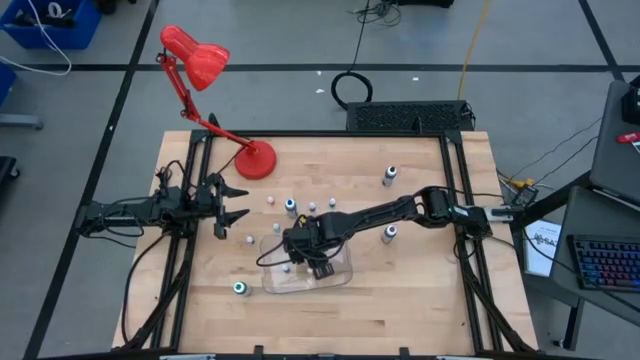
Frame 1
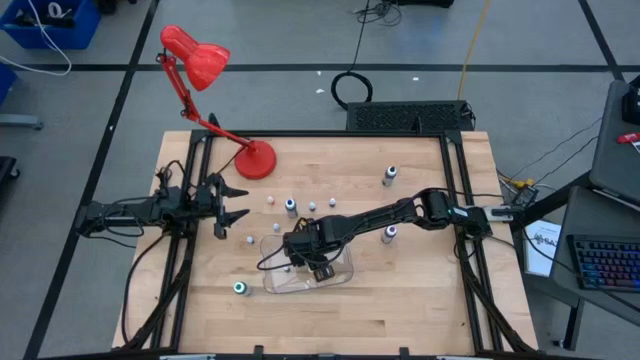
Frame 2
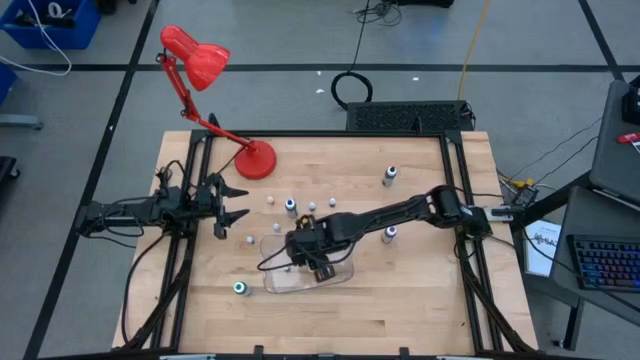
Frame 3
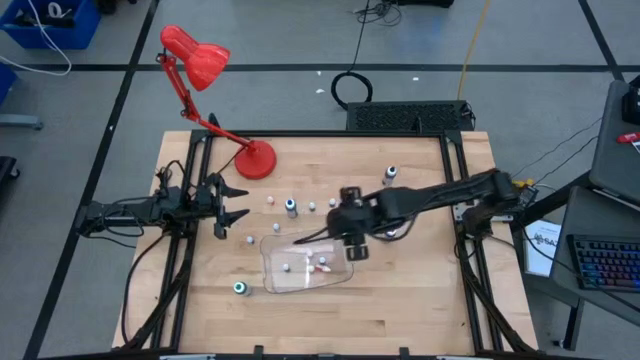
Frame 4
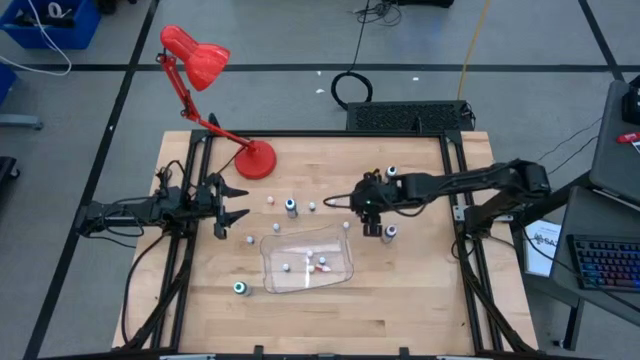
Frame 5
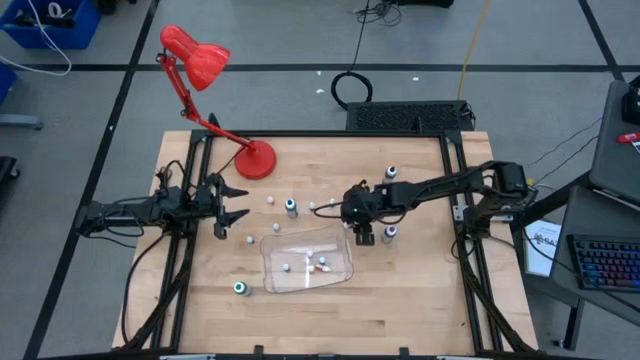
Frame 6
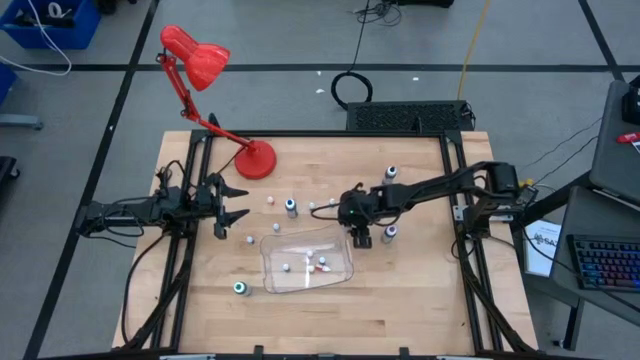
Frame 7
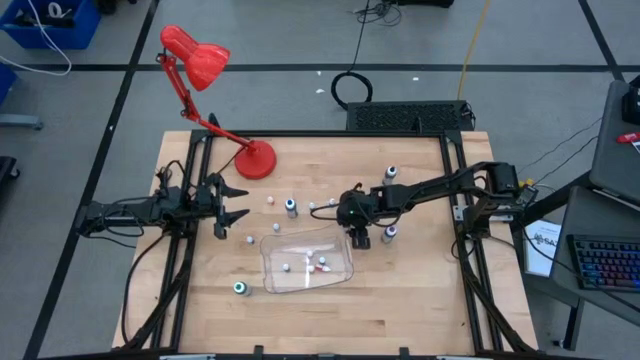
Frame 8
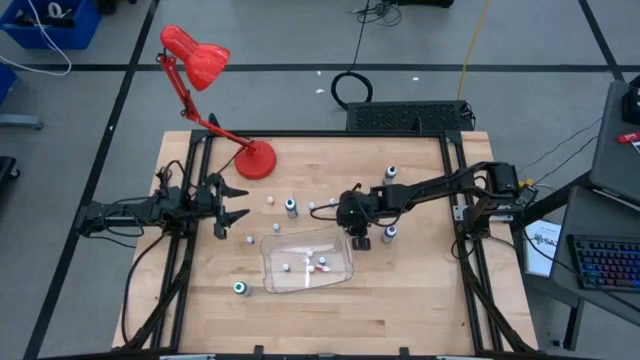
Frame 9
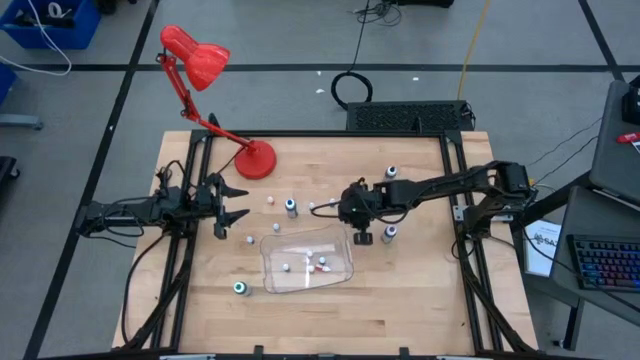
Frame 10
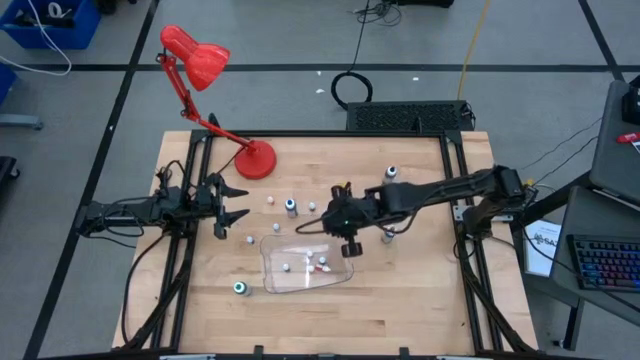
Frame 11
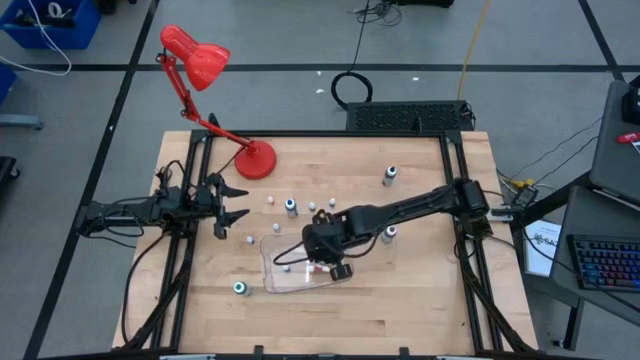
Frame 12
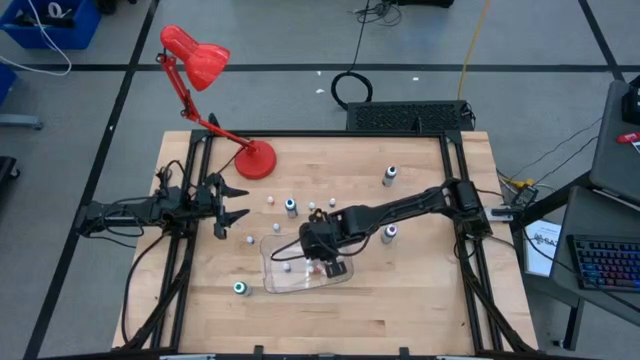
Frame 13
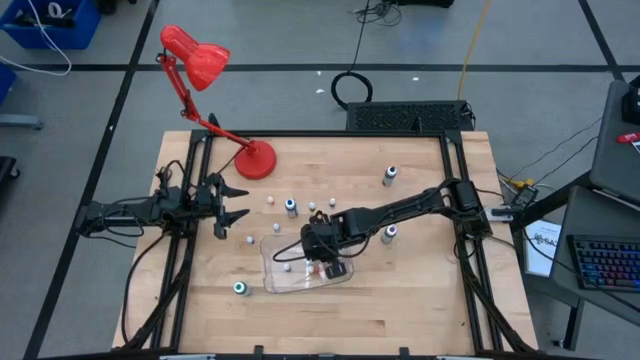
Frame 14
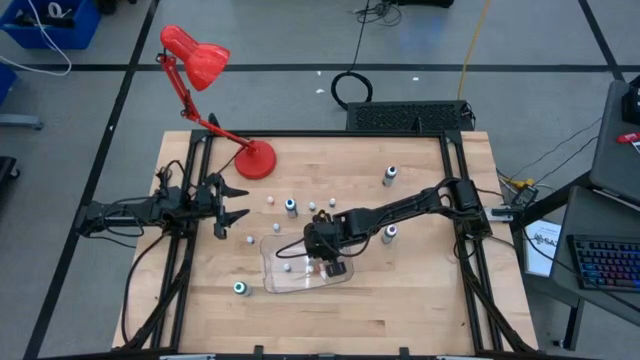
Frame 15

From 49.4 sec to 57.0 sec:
Task: Pick & Place food coloring
Put the right small purple food coloring into the bin

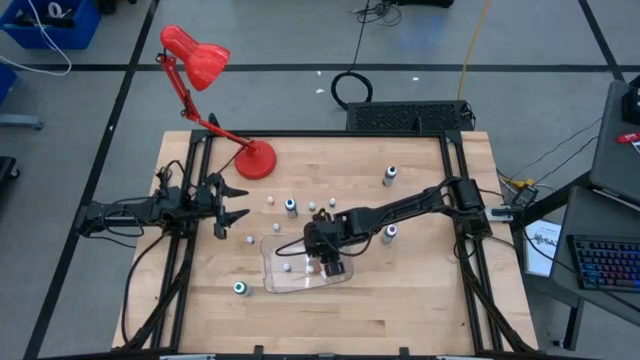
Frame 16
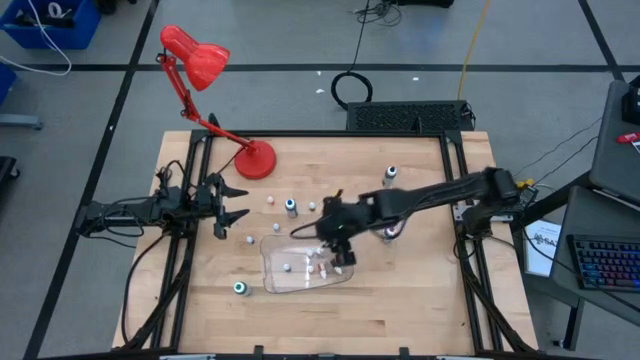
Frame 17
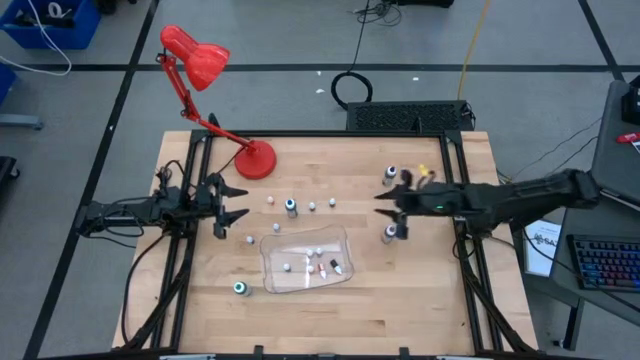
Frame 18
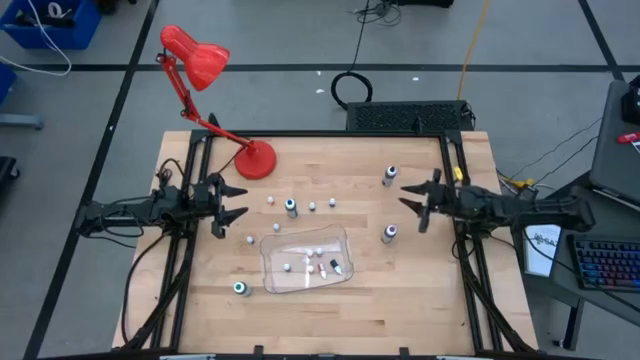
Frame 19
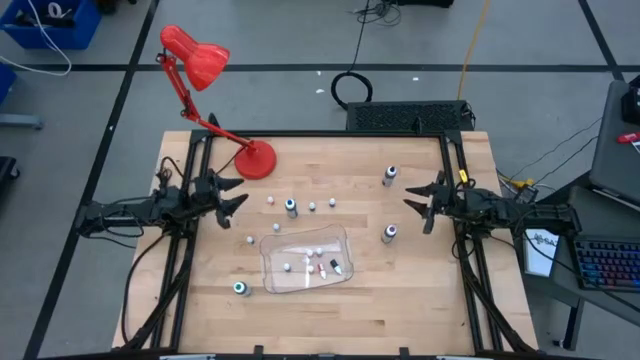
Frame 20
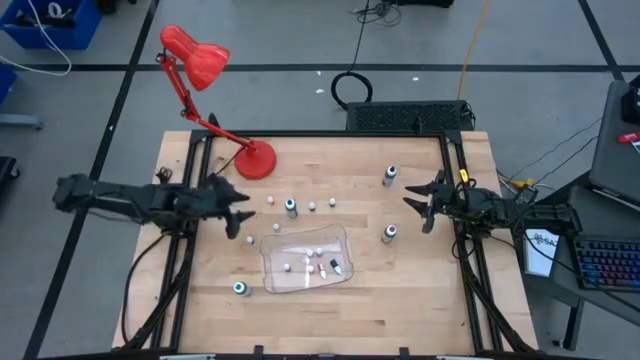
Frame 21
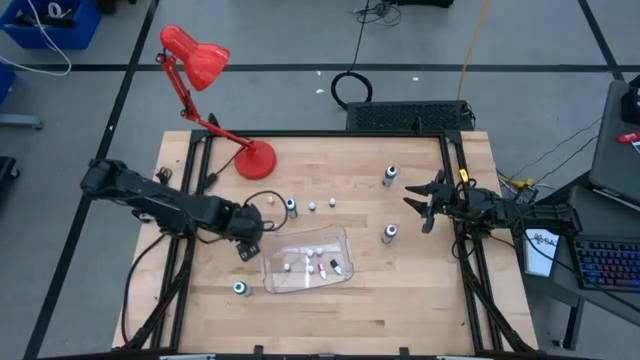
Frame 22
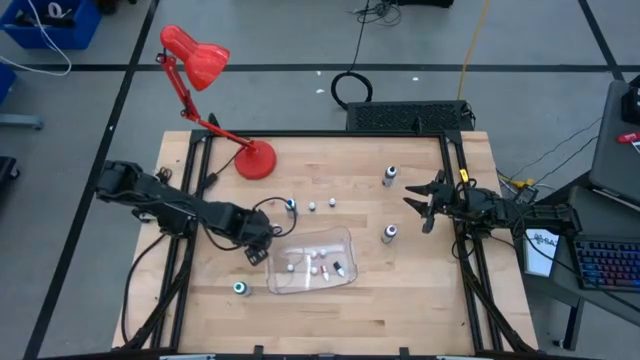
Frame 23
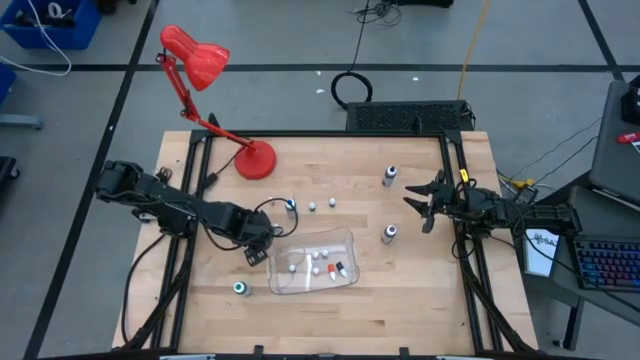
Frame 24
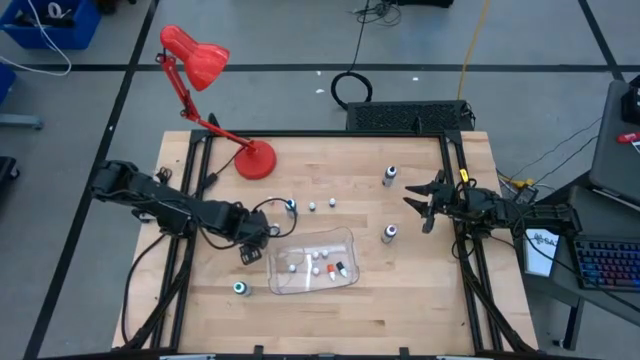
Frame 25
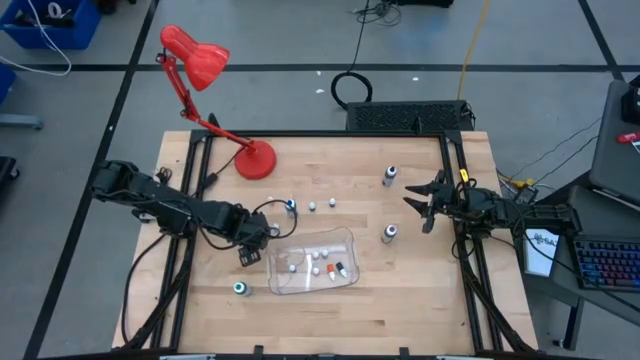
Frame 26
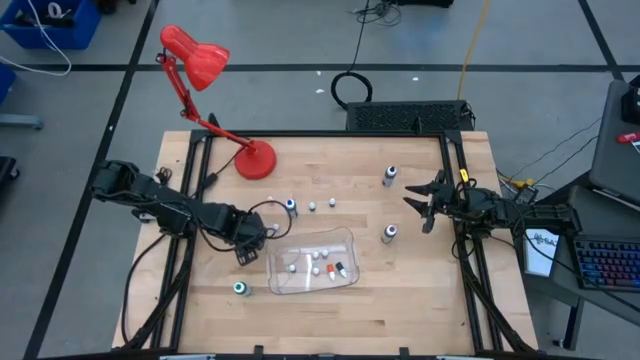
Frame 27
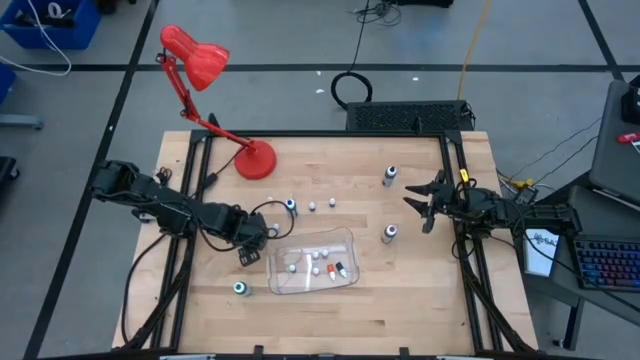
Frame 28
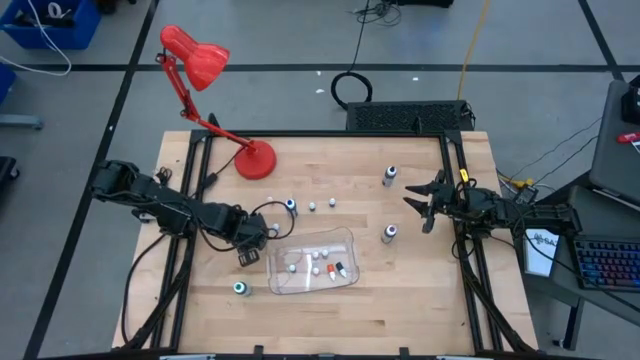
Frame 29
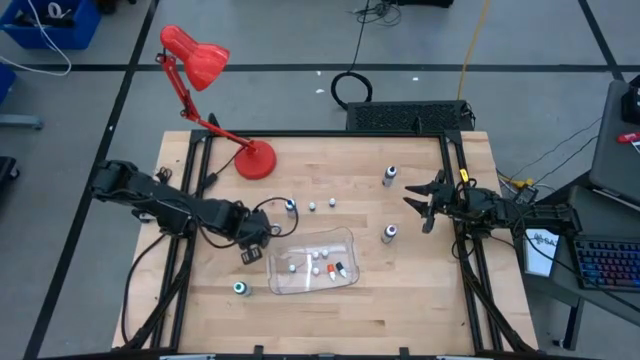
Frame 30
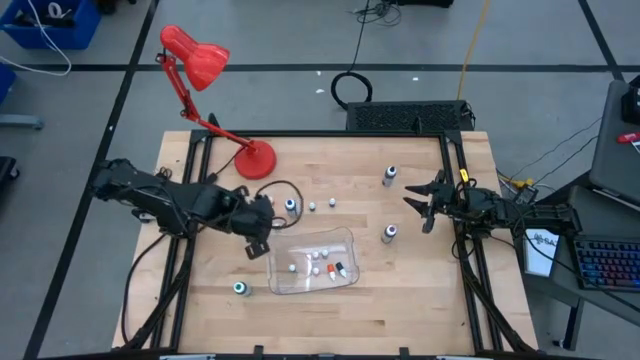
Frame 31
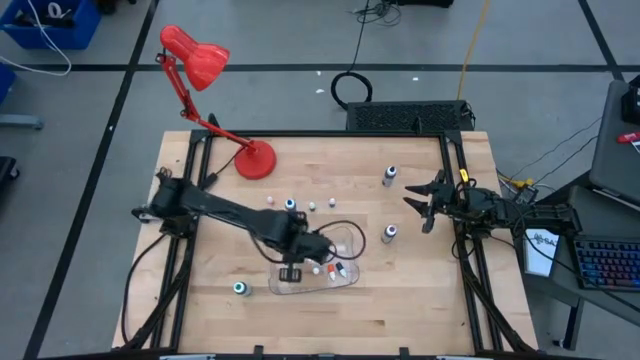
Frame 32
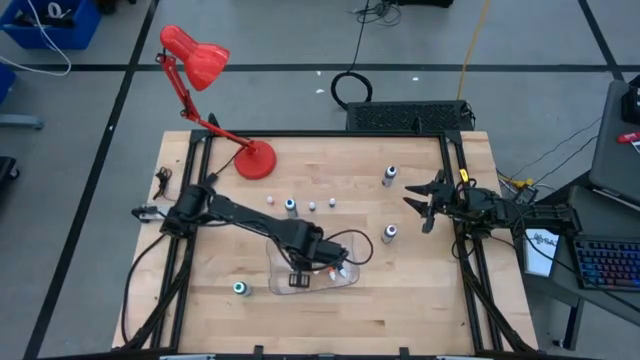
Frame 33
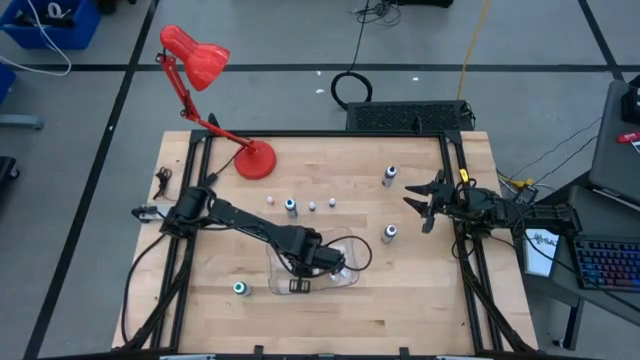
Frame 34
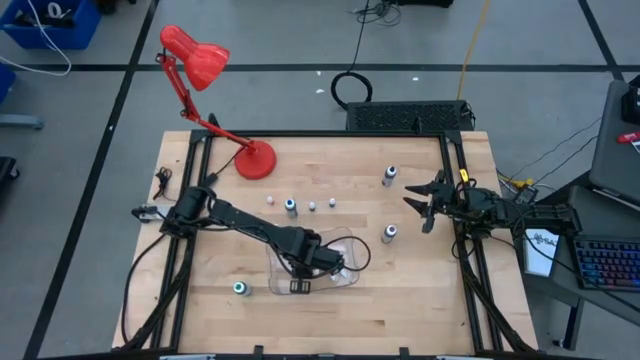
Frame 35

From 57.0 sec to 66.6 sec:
Put the left small black food coloring into the bin

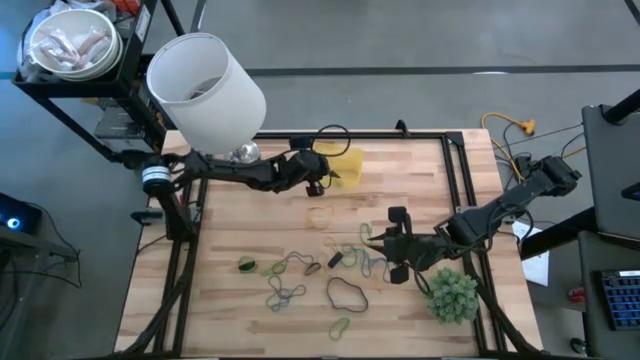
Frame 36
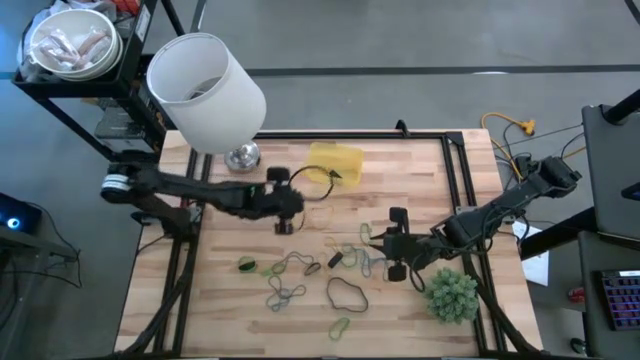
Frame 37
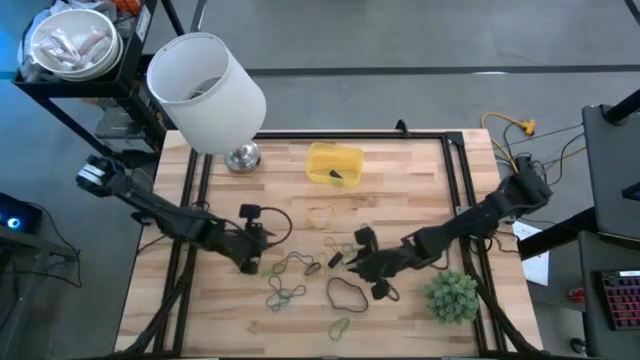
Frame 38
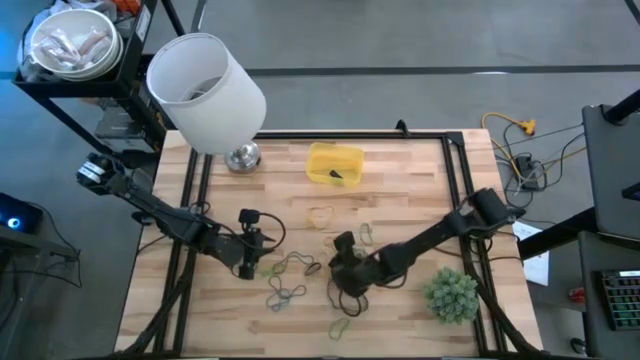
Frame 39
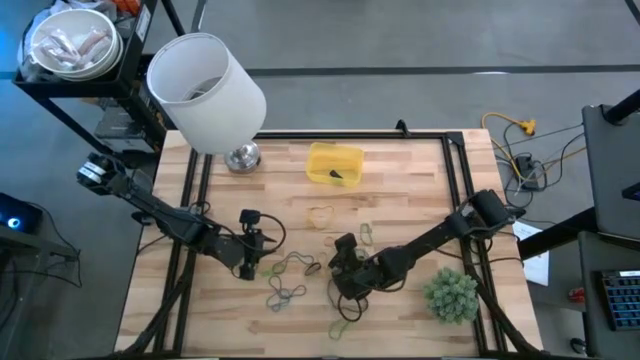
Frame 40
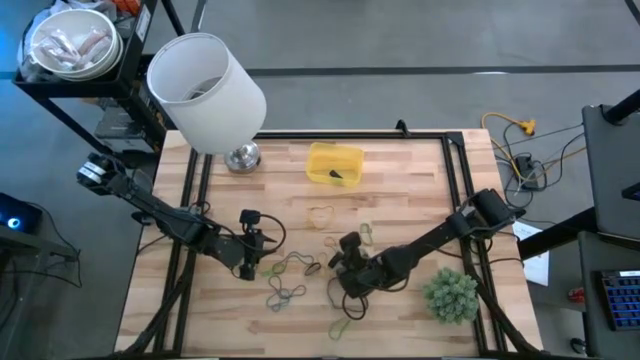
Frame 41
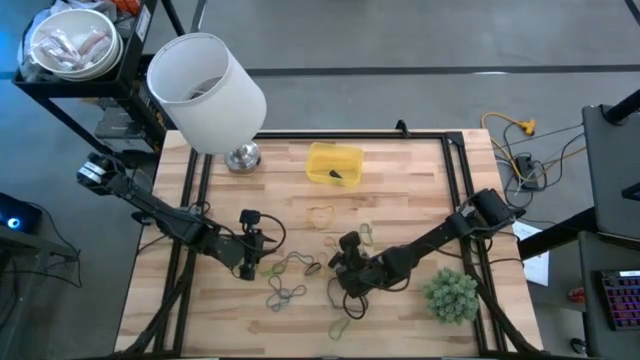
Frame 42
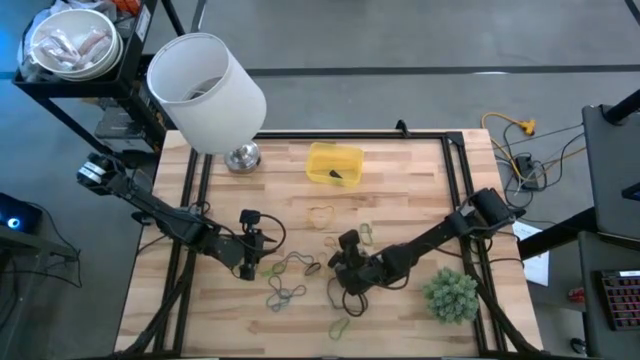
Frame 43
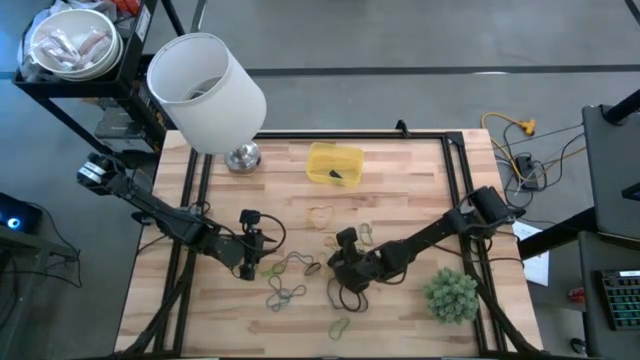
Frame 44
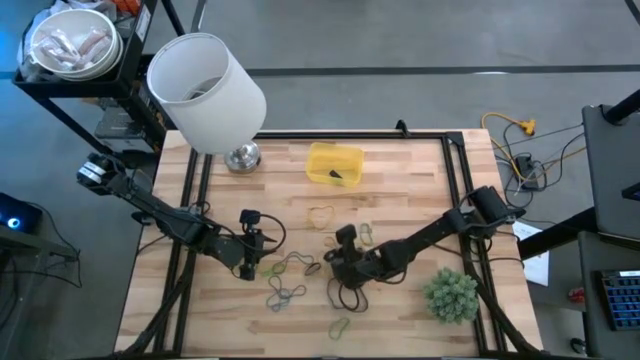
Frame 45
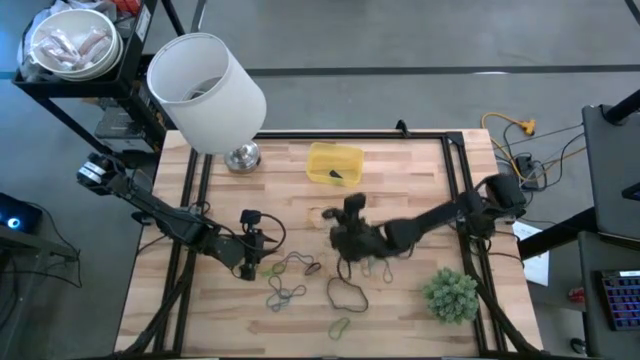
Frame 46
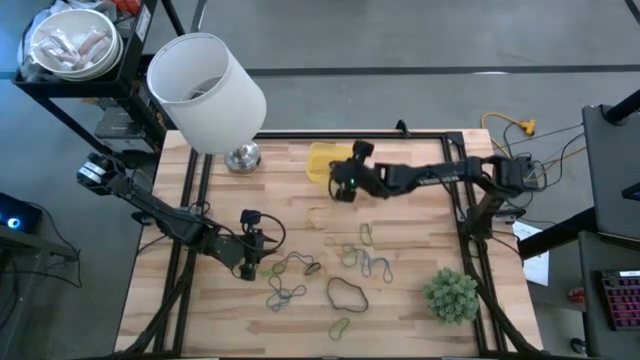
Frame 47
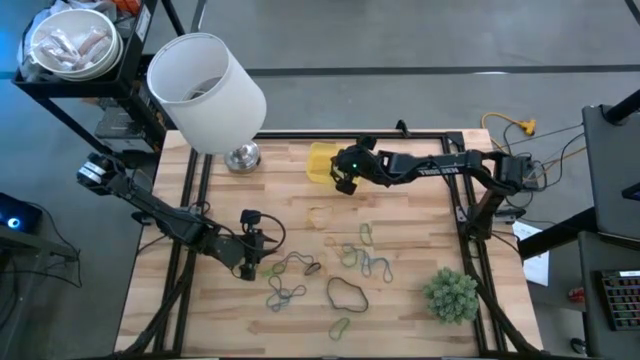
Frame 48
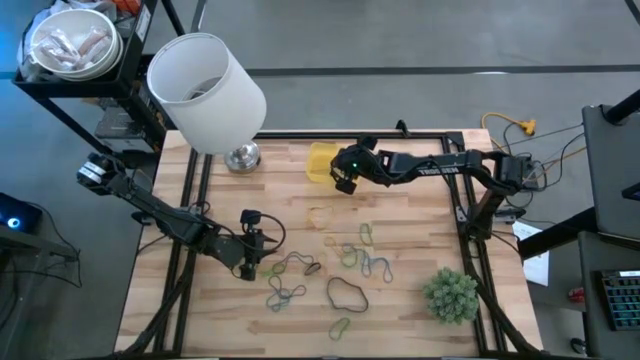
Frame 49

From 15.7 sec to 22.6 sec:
Task: Pick and place rubber bands into bin
Put the black rubber band into the yellow bin
